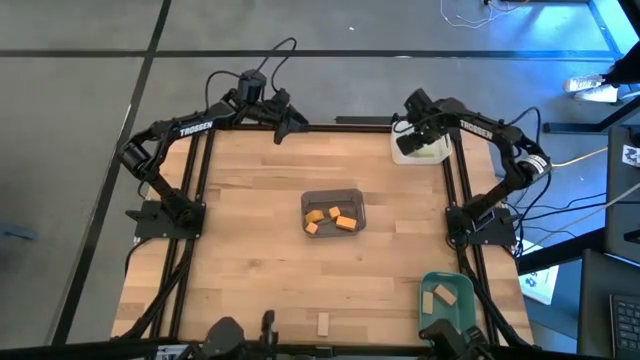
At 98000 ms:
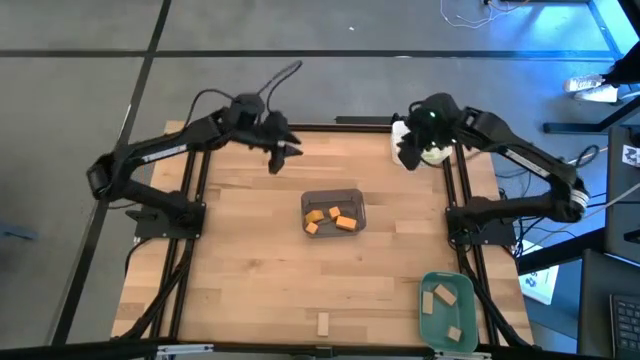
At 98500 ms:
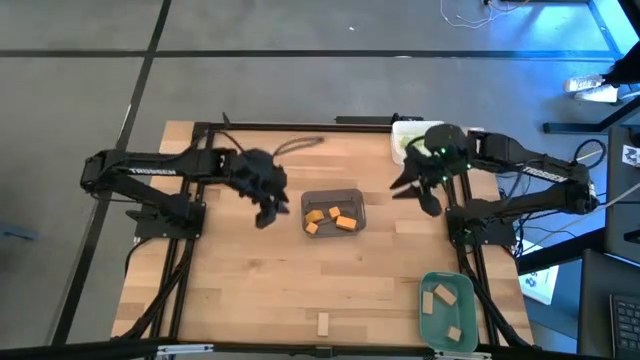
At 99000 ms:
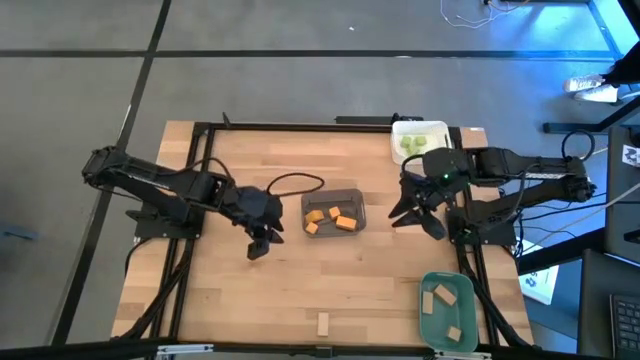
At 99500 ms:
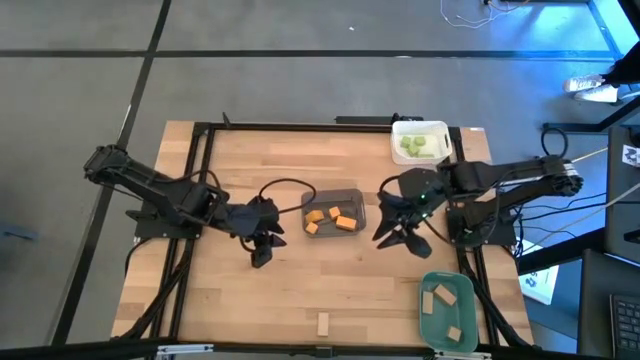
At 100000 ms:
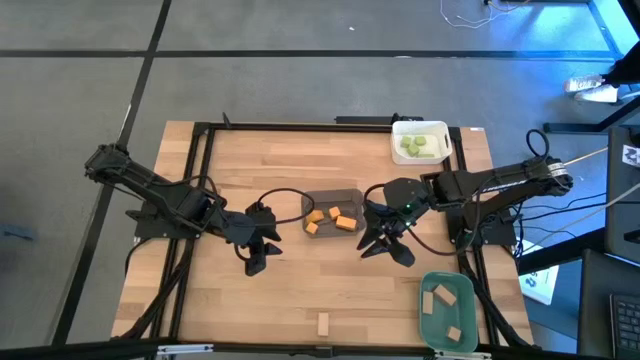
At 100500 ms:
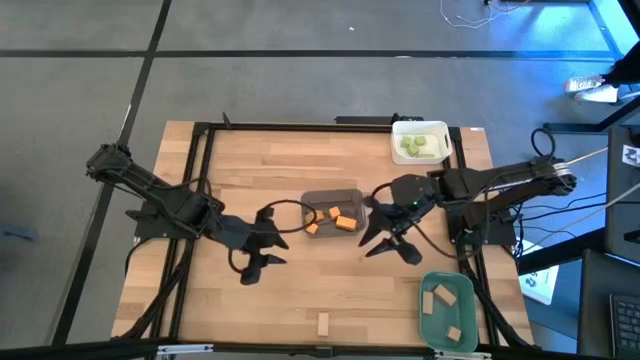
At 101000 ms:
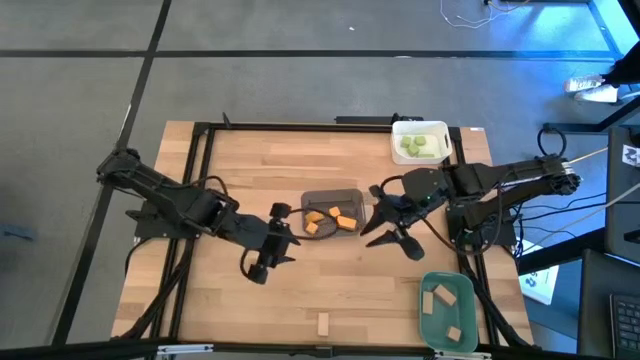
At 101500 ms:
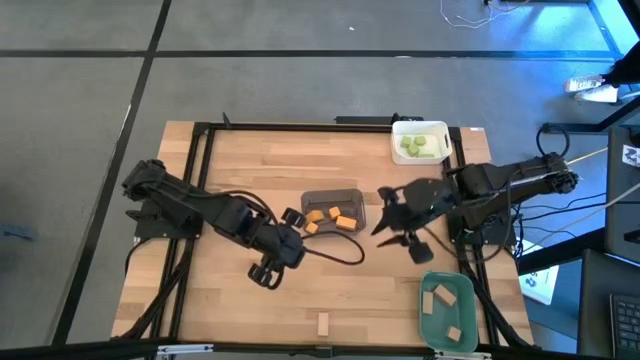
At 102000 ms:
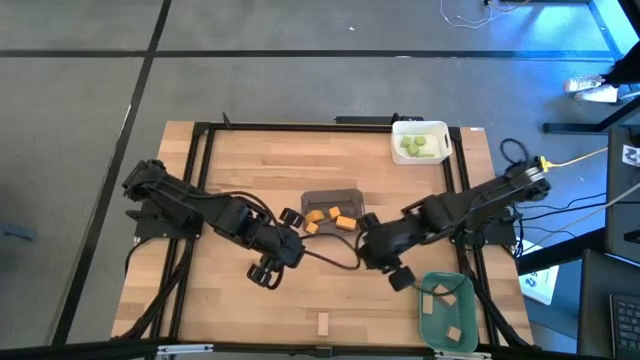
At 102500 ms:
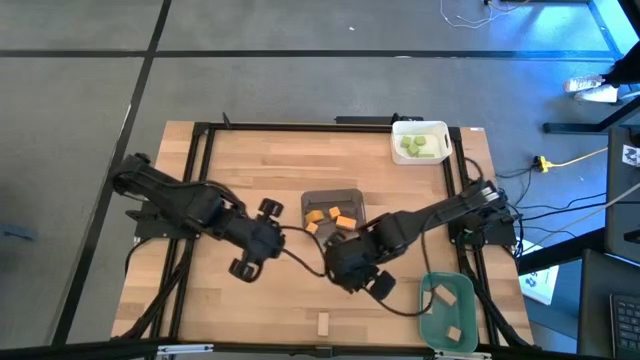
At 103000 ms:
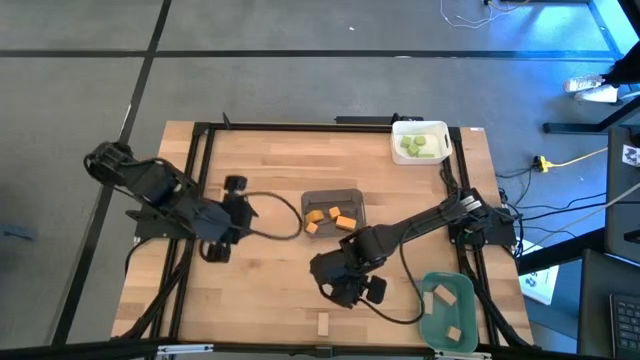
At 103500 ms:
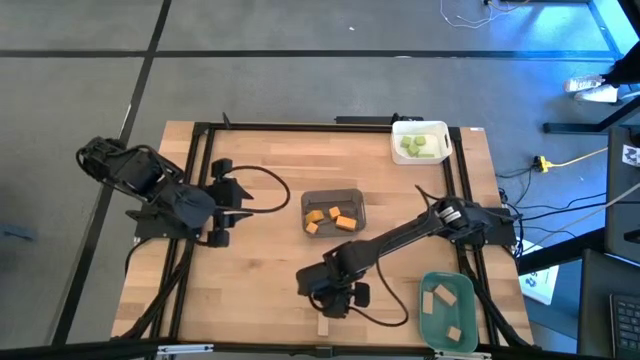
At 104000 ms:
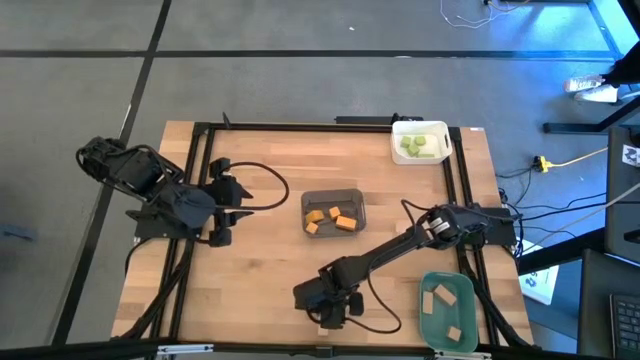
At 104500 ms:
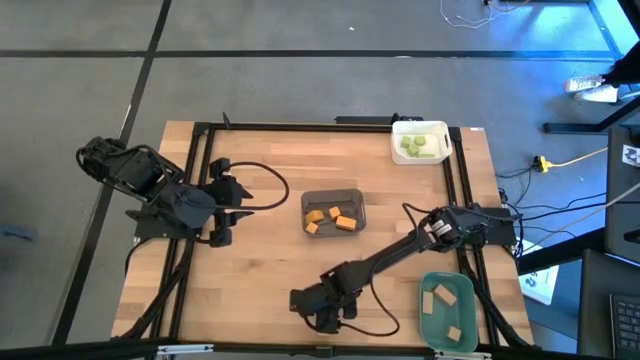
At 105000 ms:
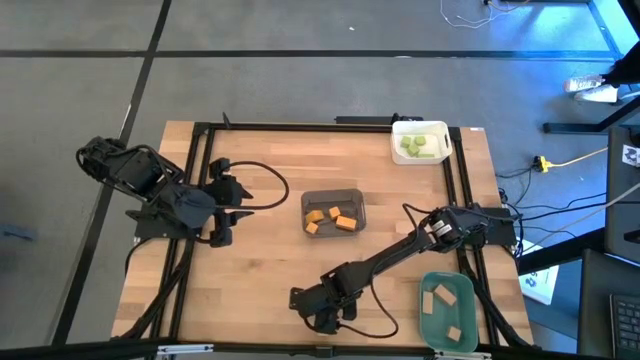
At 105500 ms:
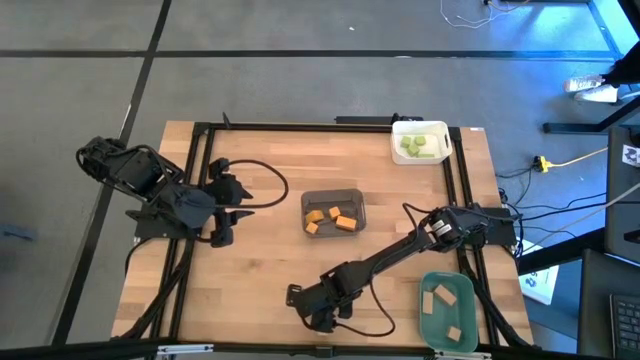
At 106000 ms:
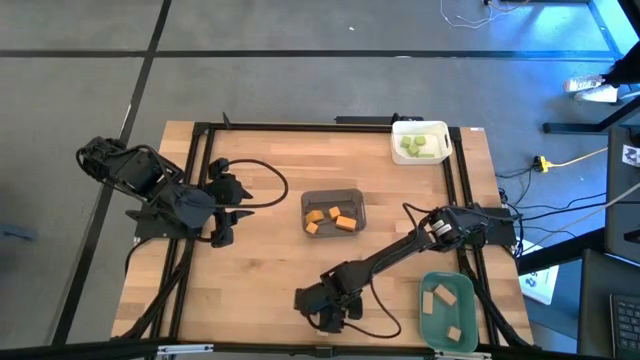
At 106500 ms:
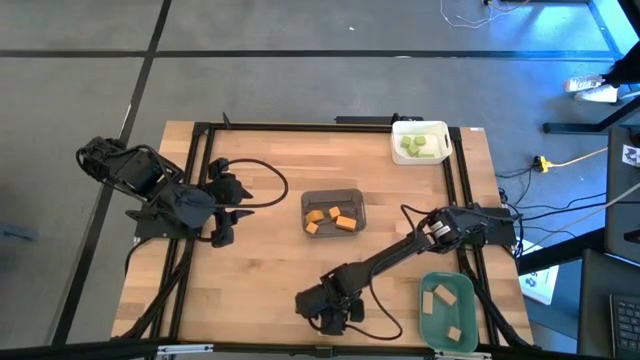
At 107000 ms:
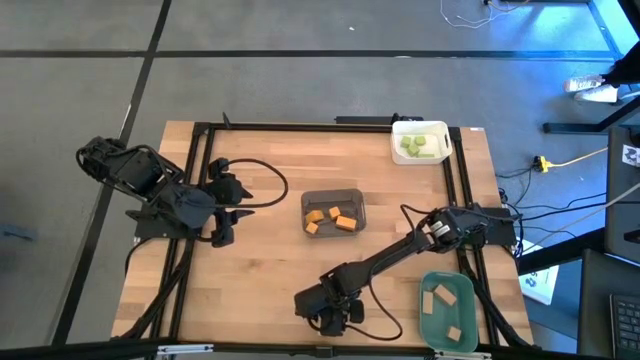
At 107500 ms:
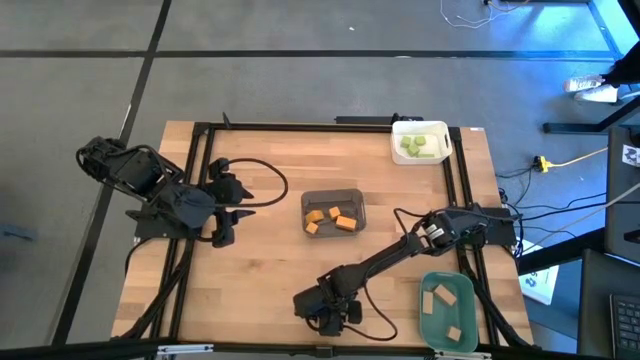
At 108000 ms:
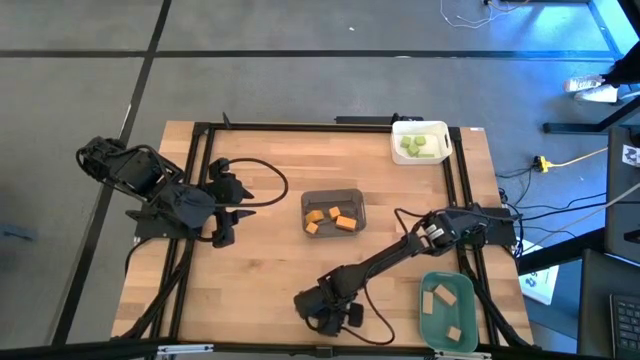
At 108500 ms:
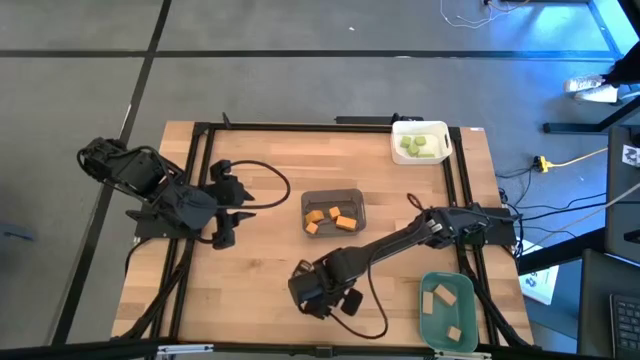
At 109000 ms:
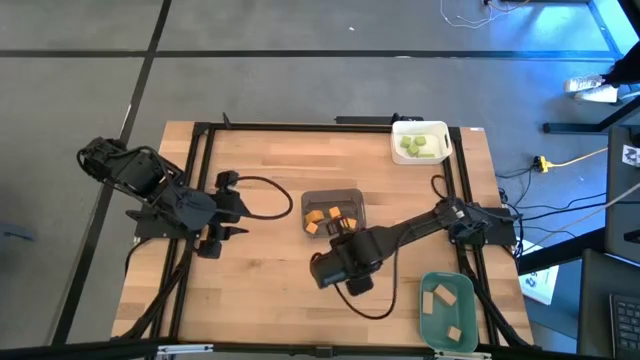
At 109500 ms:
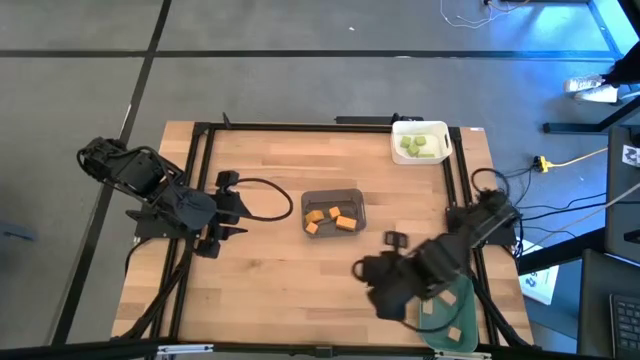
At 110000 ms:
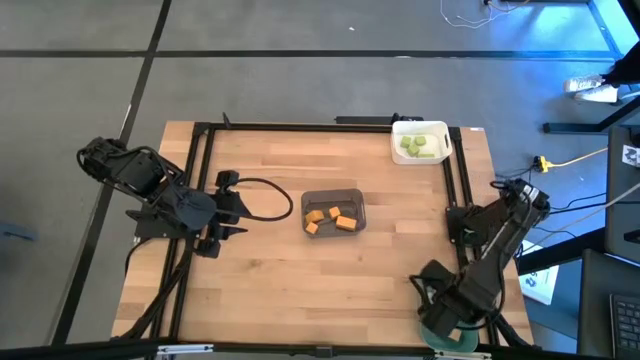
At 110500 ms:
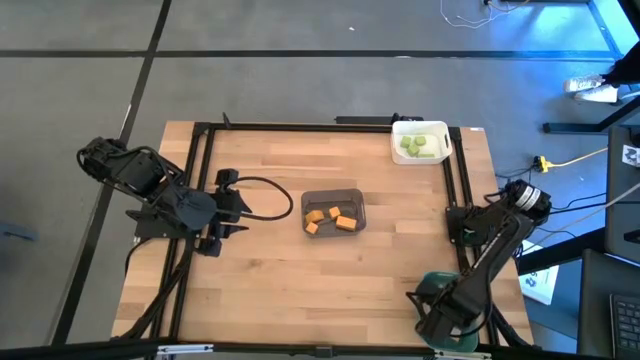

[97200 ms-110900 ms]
Task: Sort & place blocks by color
Put the brown block in the blue bin

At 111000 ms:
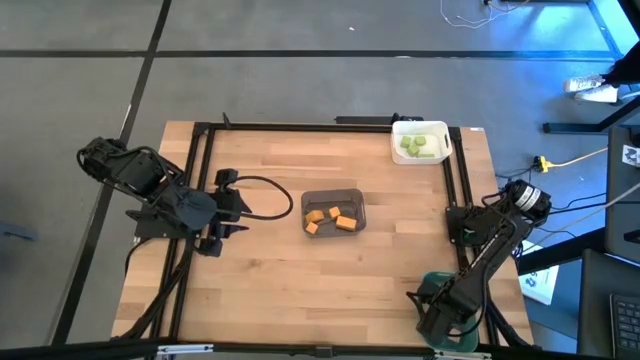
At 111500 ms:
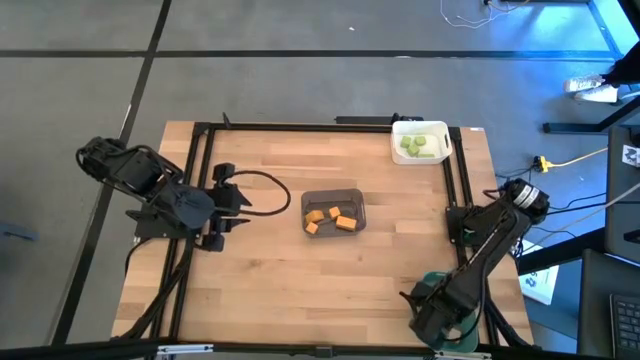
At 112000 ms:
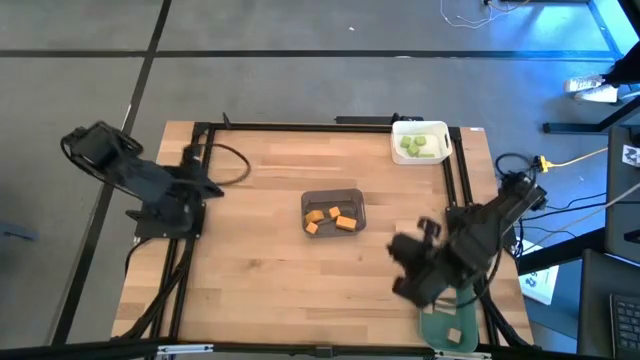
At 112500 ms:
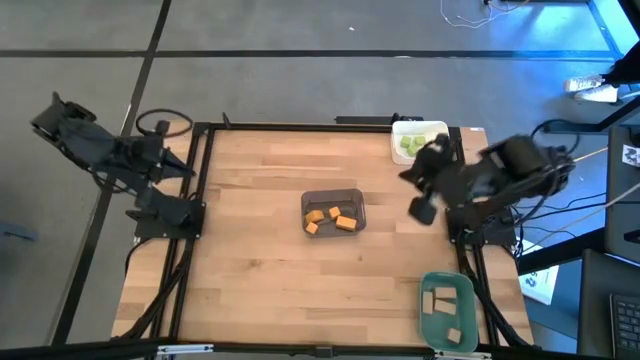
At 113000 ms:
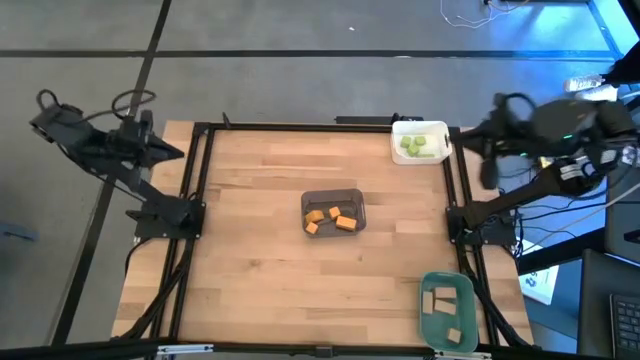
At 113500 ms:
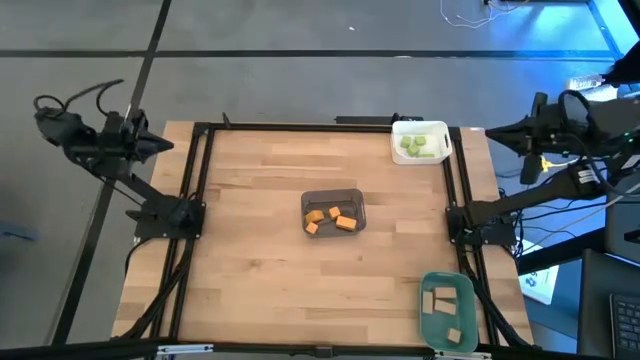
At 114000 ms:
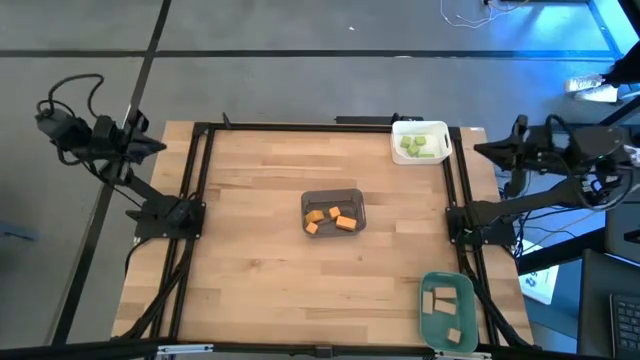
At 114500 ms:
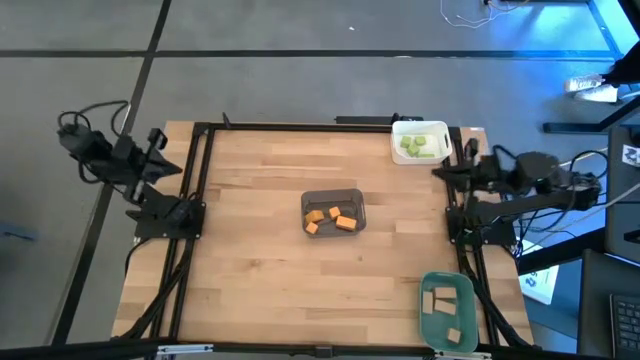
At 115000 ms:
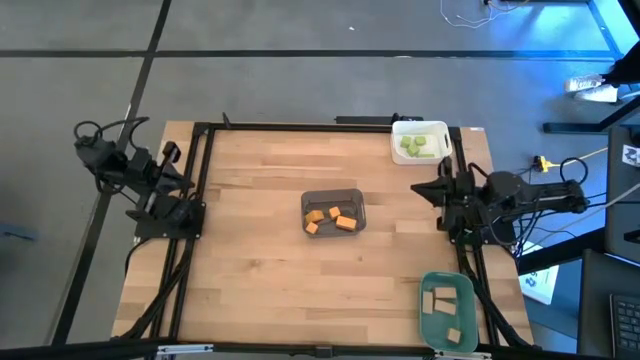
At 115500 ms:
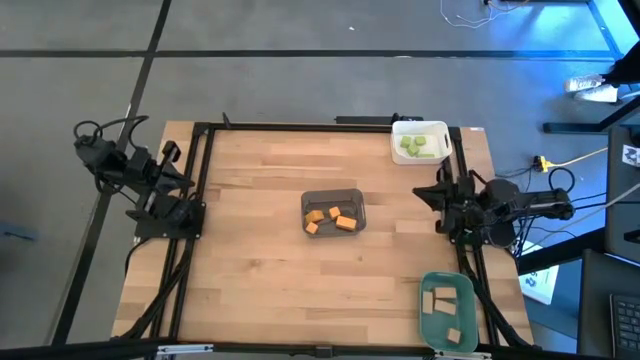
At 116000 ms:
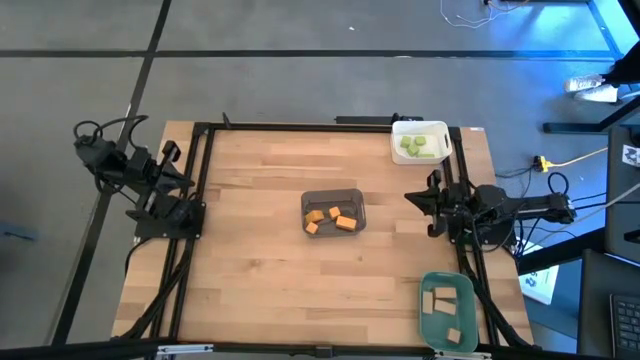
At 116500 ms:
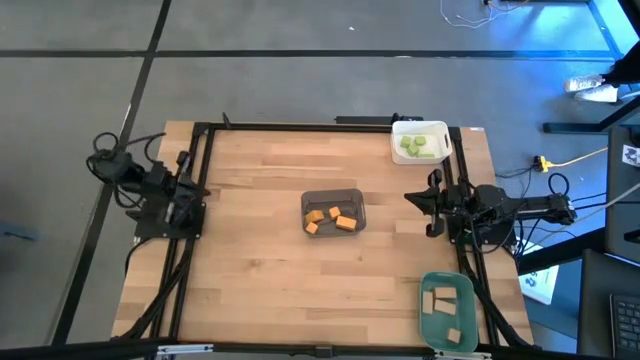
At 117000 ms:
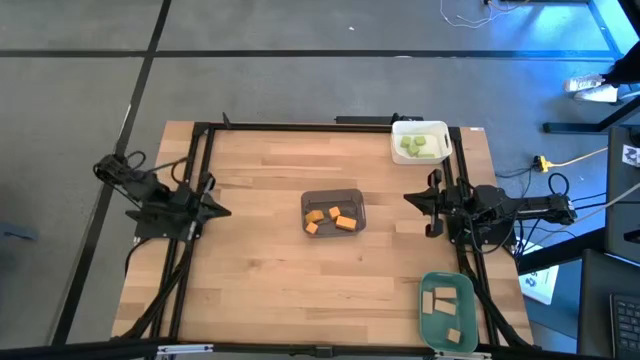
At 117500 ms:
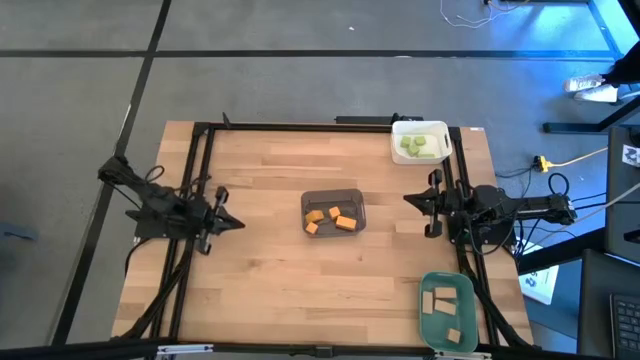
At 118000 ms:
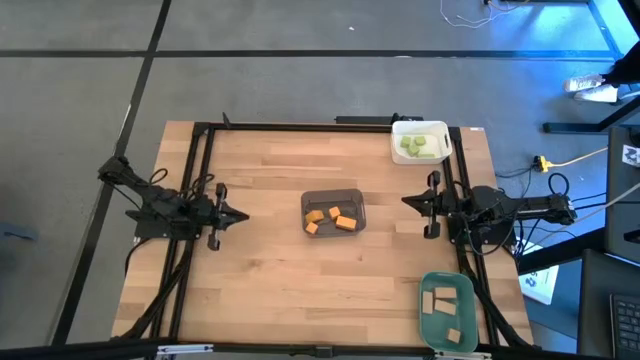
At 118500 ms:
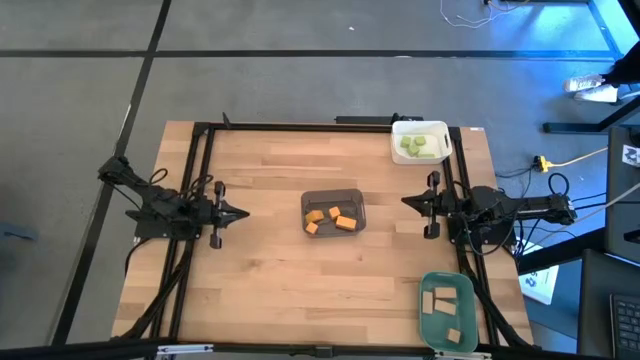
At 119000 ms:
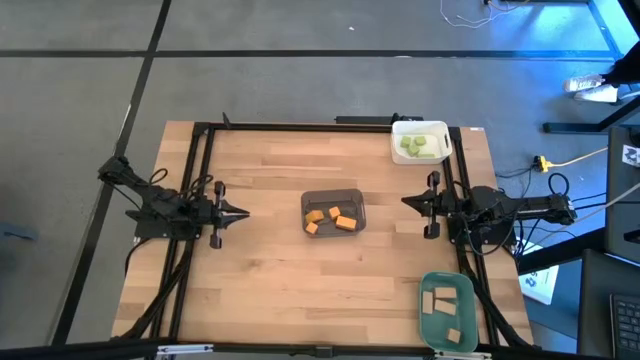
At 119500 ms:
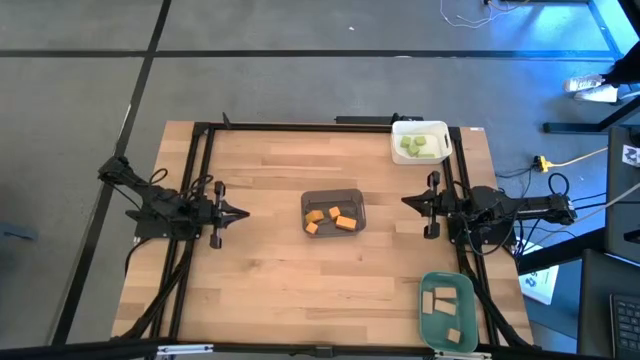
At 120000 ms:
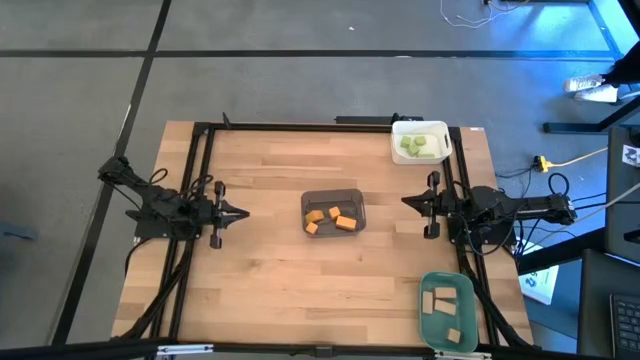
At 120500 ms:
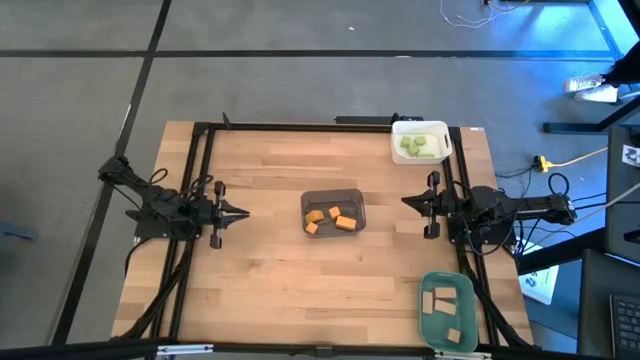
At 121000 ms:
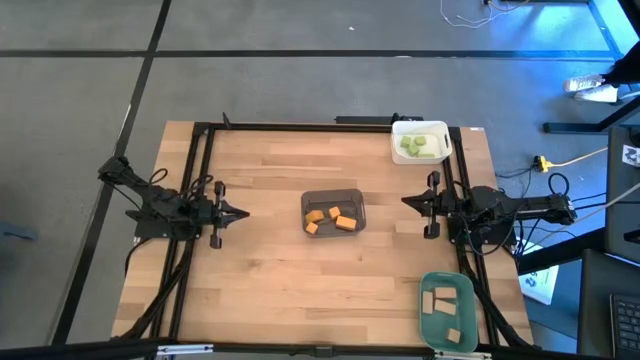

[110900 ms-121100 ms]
Return to Home Position
